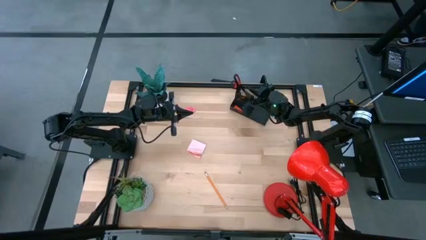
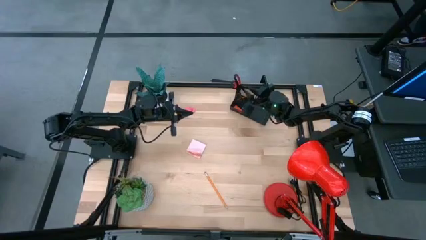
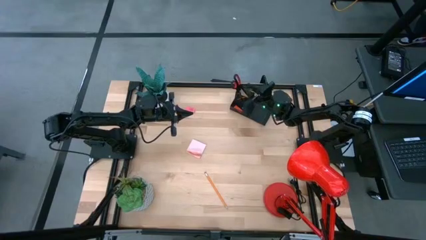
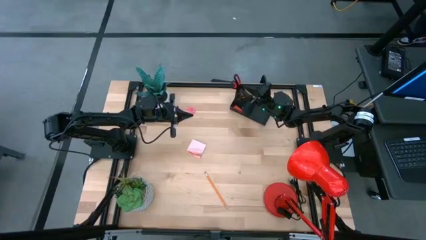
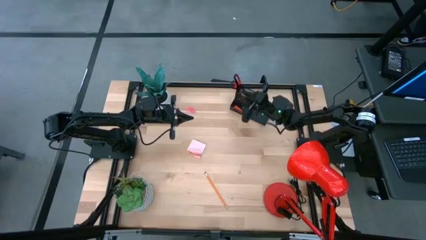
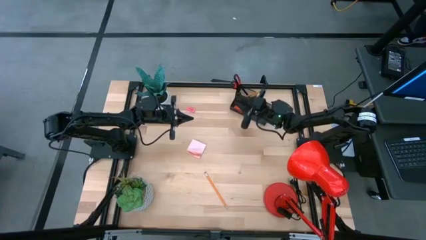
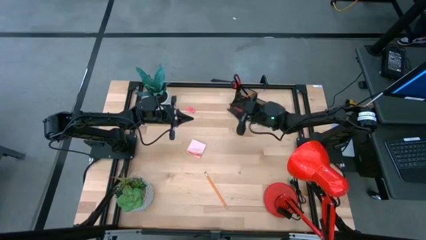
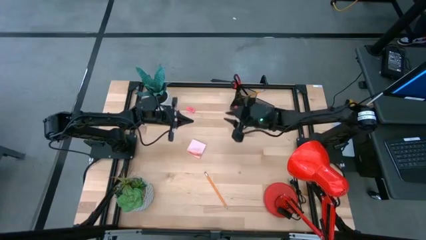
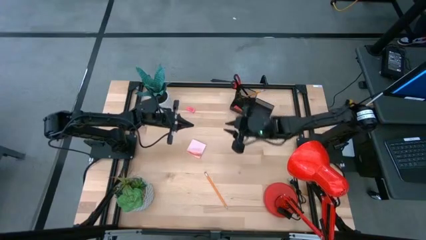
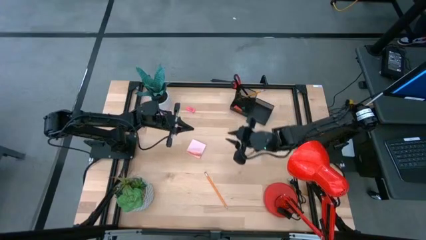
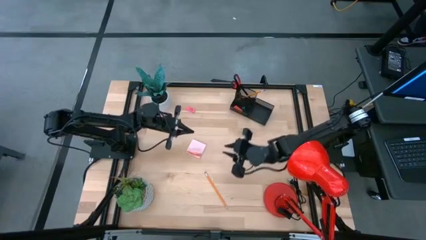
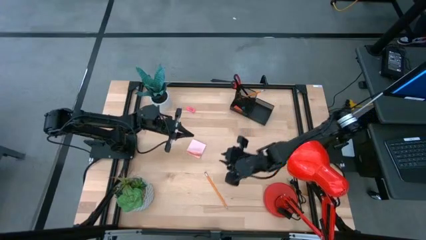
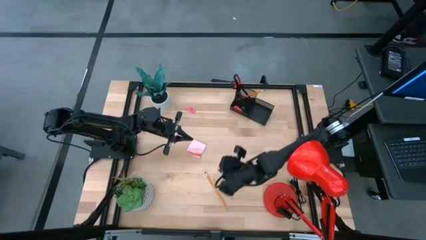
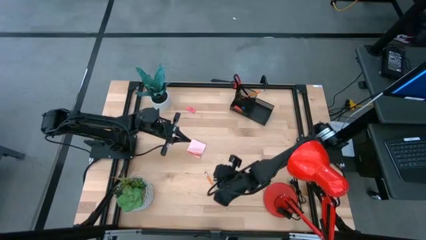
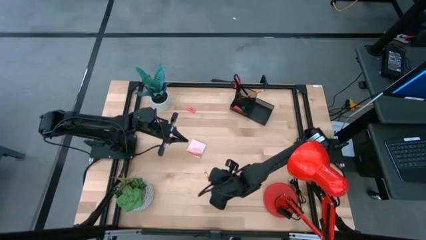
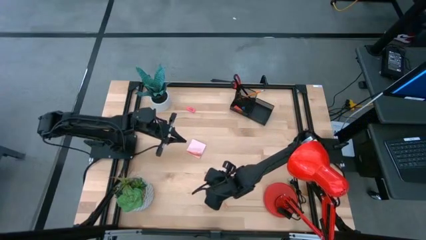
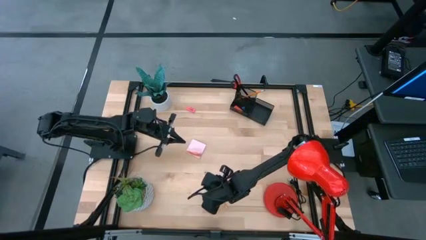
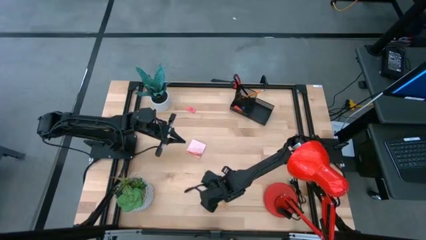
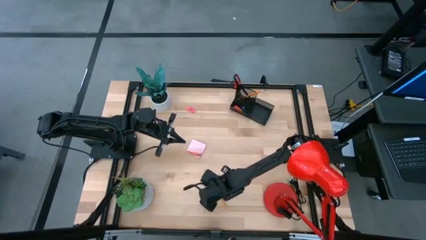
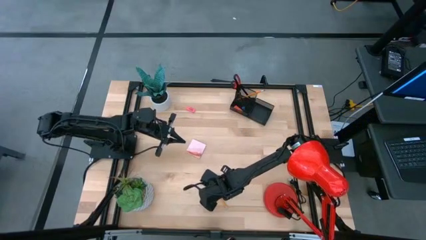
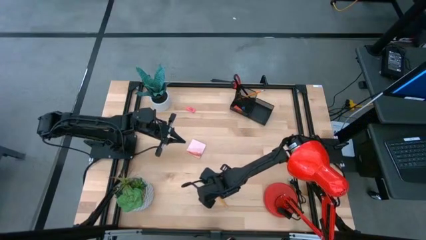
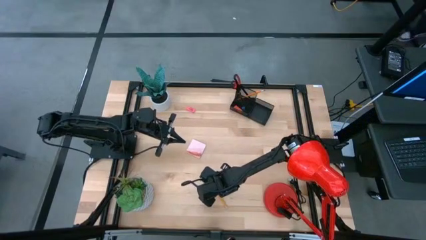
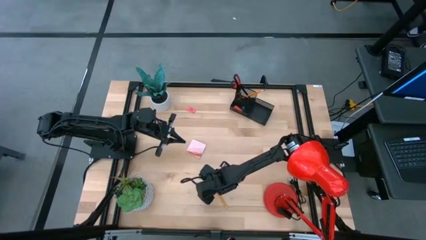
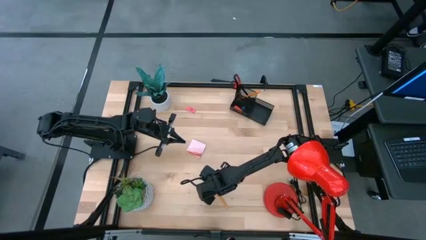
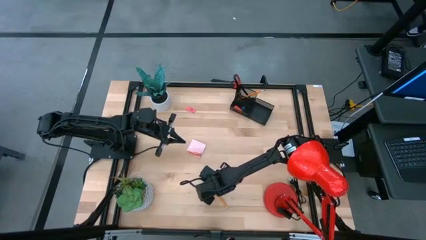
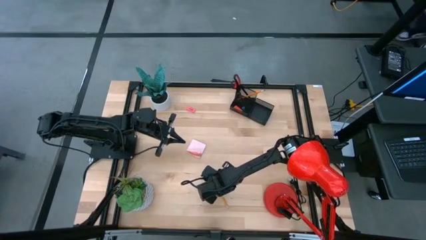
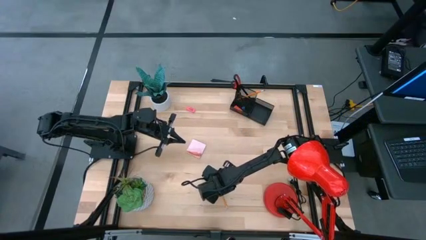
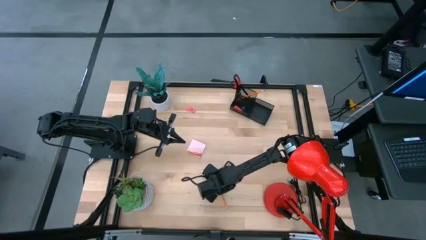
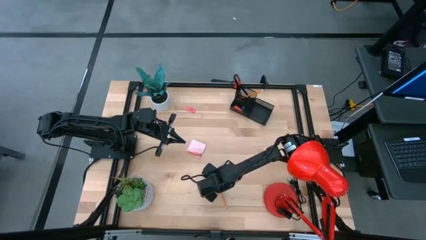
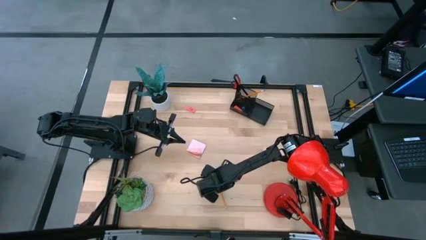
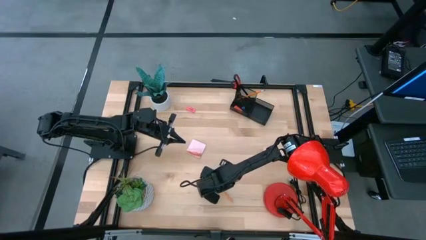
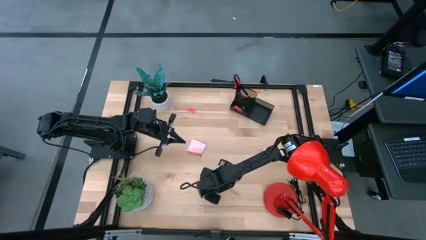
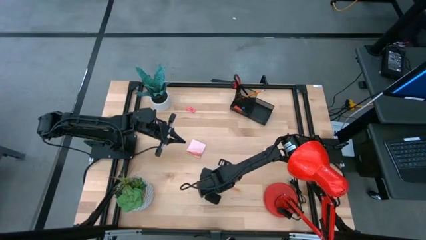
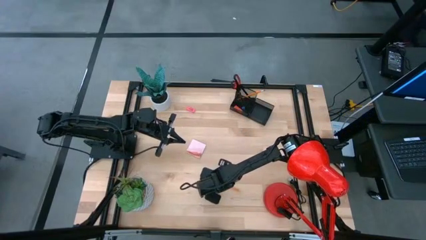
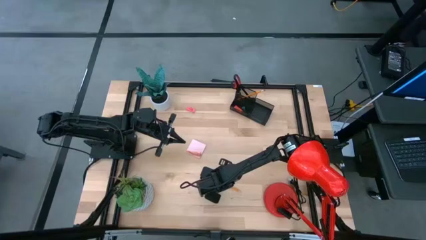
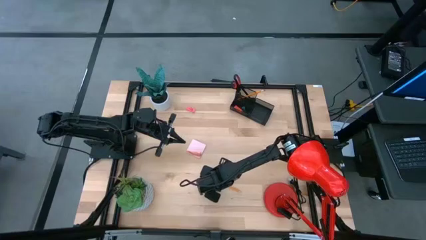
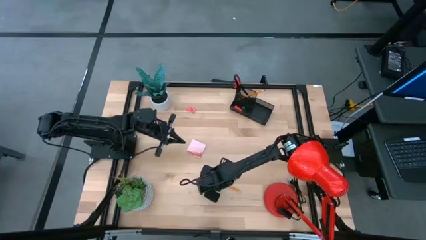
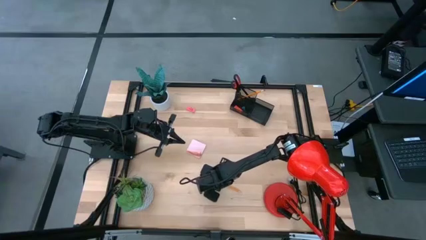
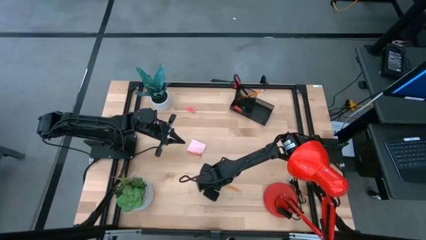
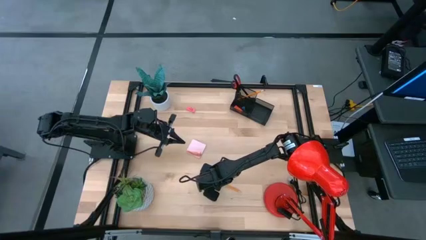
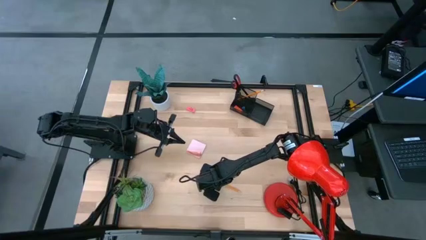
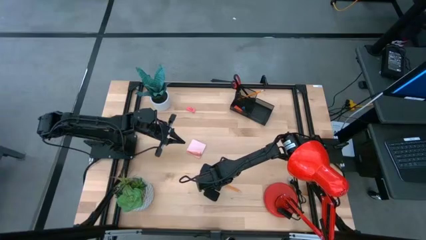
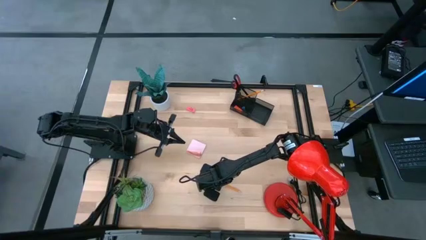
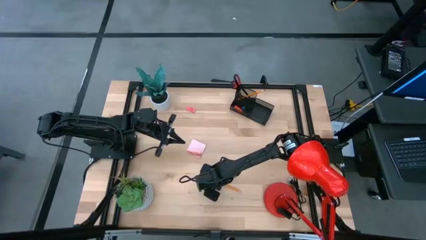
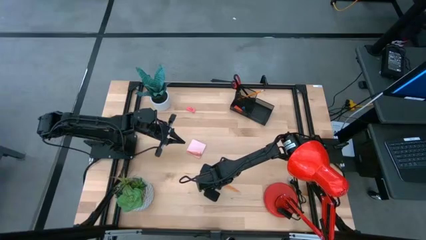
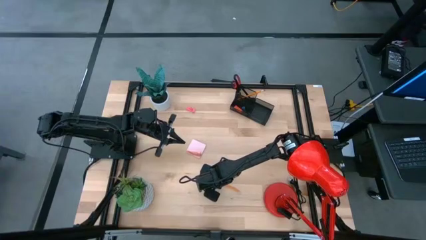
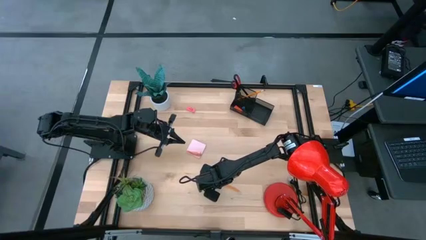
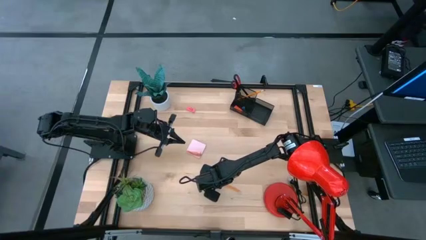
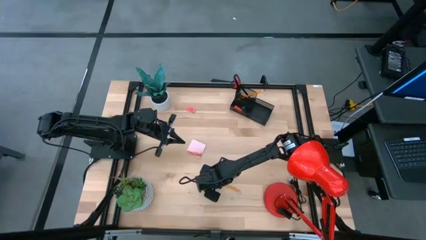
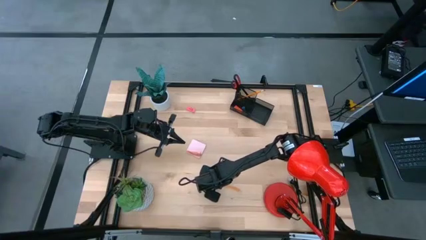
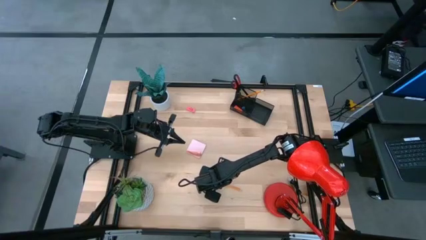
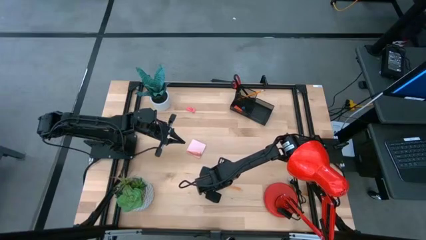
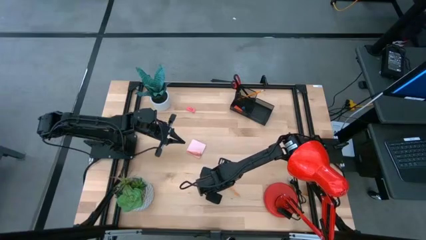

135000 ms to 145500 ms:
Task: Pick and place office supplies into organizer
Put the pencil into the black desk organizer
